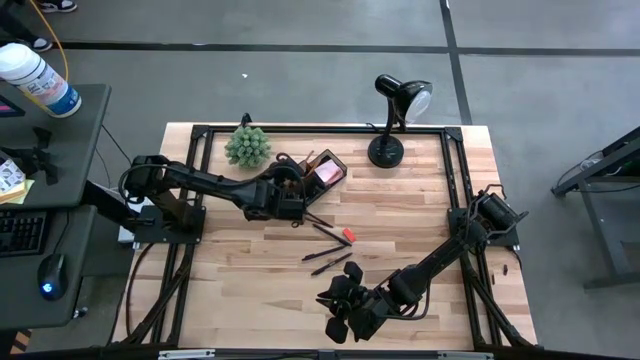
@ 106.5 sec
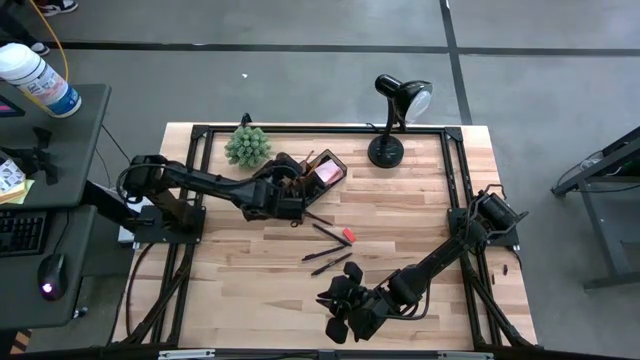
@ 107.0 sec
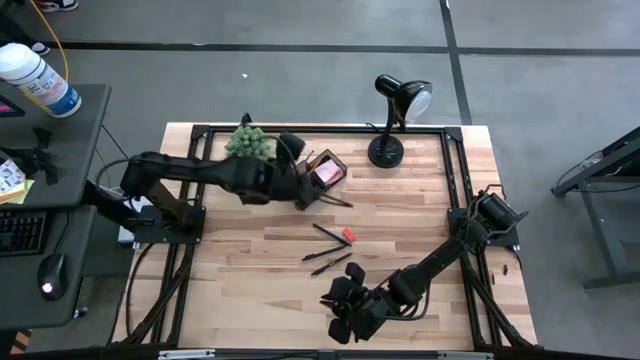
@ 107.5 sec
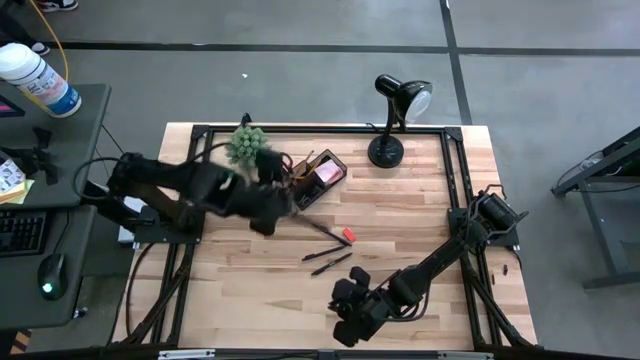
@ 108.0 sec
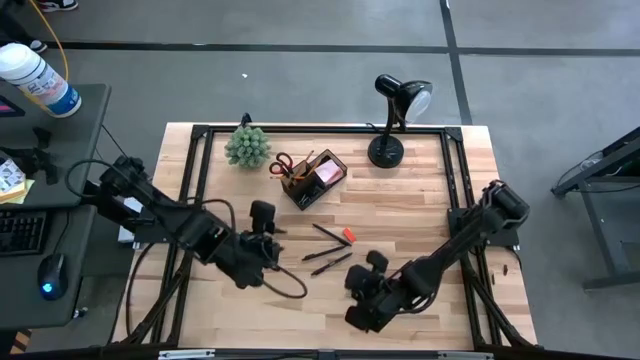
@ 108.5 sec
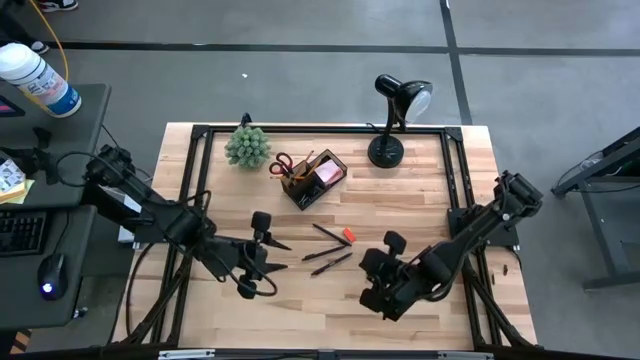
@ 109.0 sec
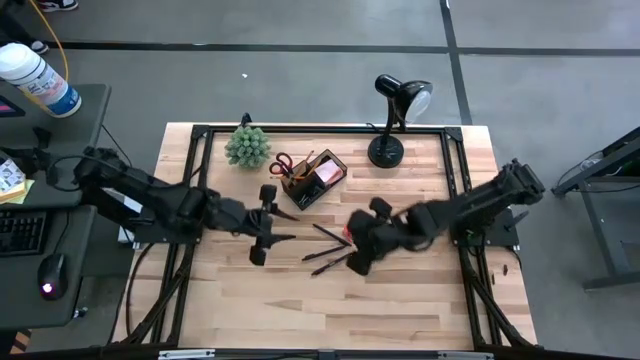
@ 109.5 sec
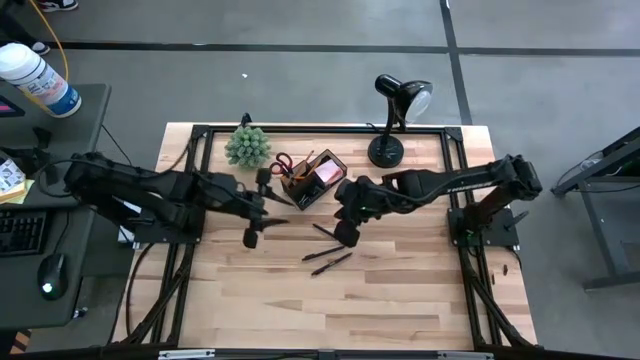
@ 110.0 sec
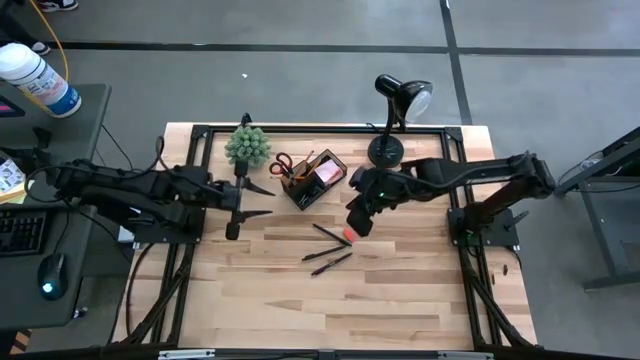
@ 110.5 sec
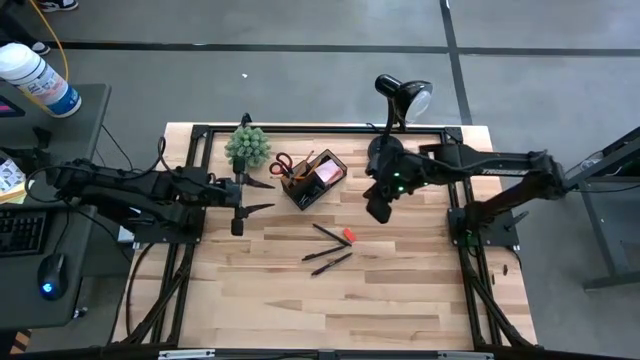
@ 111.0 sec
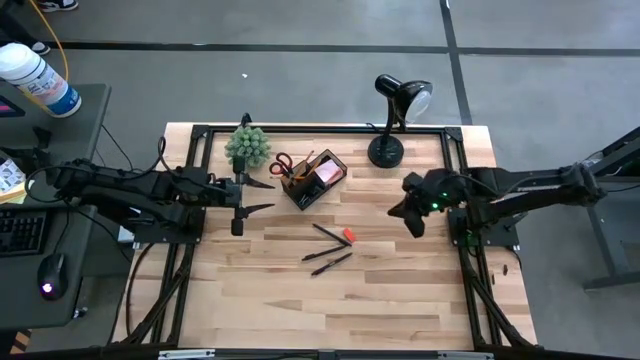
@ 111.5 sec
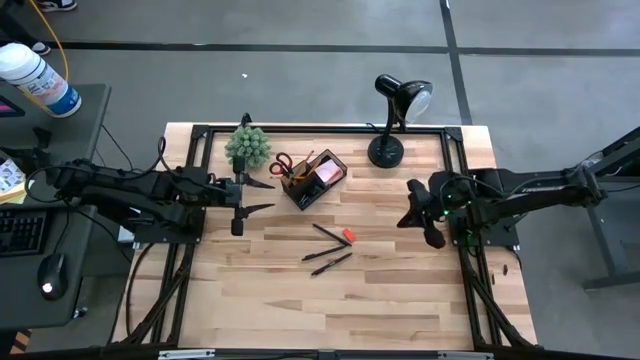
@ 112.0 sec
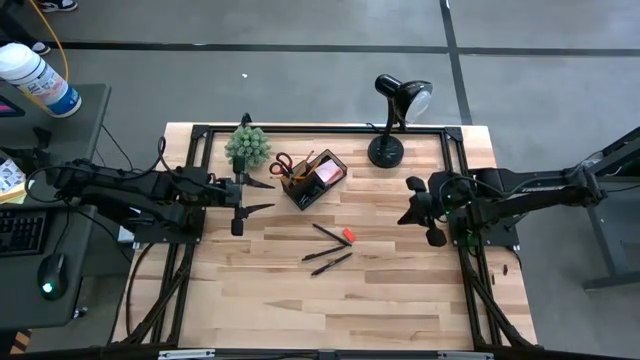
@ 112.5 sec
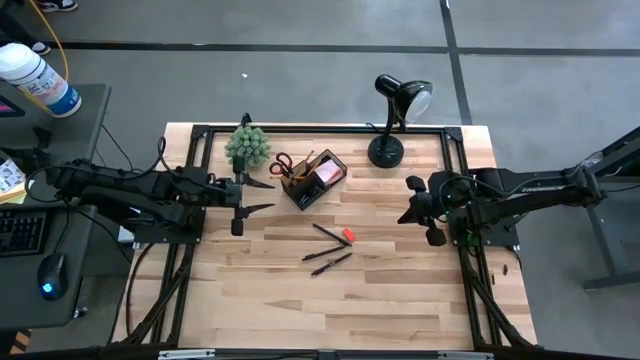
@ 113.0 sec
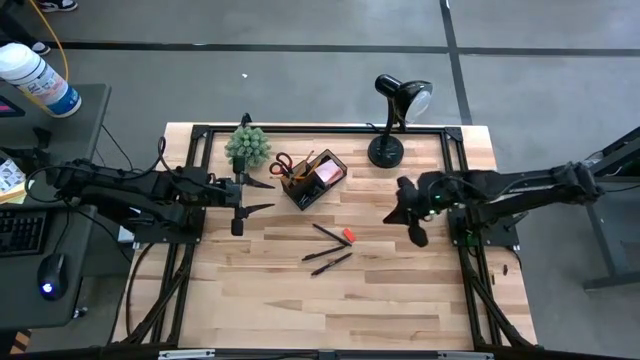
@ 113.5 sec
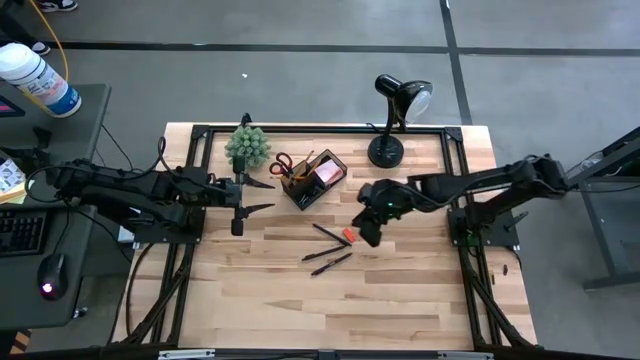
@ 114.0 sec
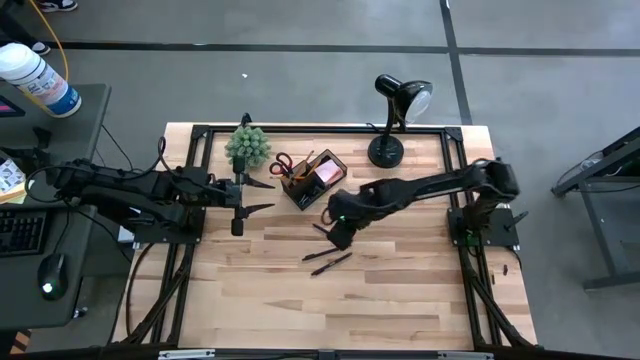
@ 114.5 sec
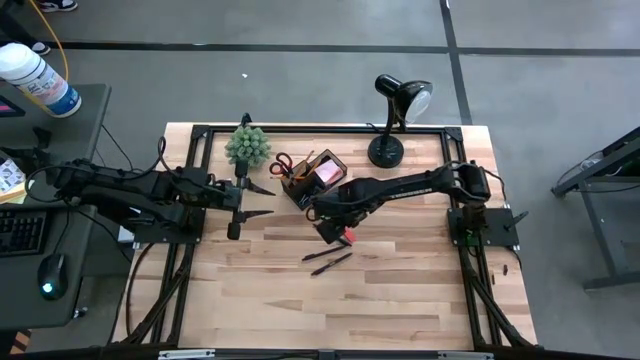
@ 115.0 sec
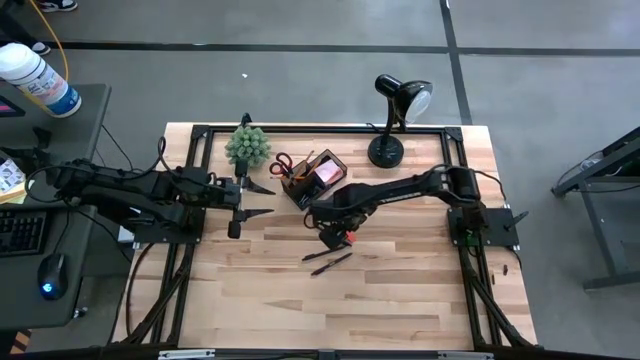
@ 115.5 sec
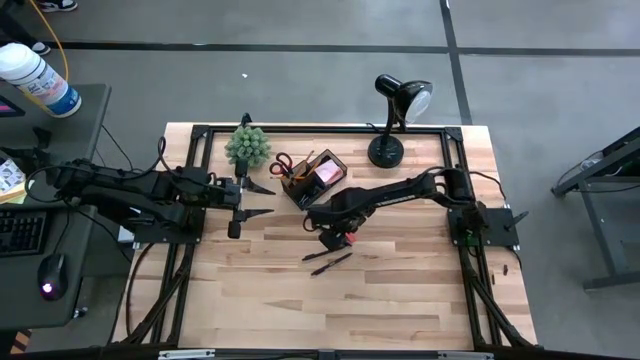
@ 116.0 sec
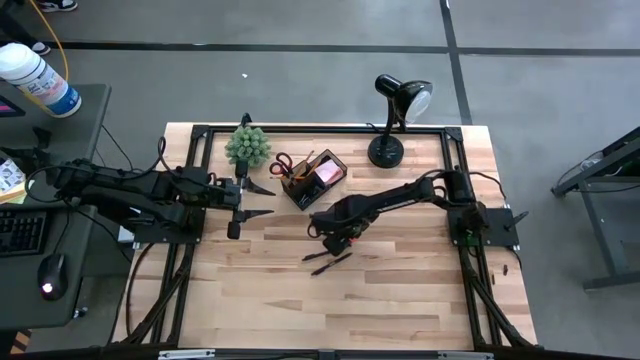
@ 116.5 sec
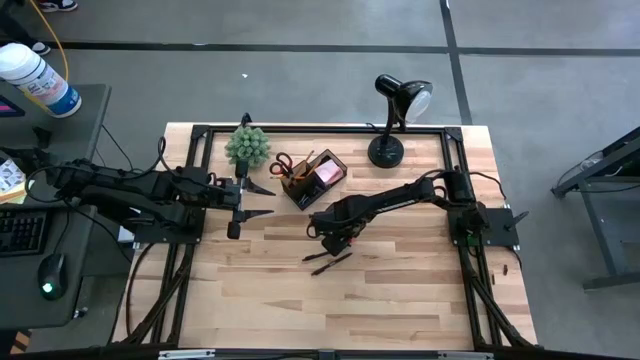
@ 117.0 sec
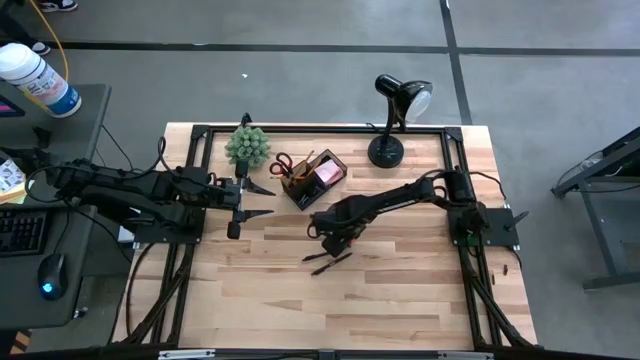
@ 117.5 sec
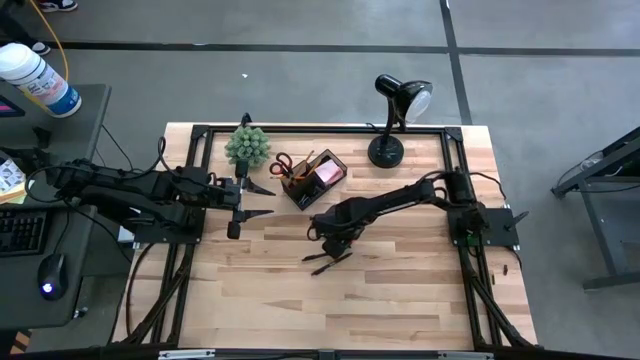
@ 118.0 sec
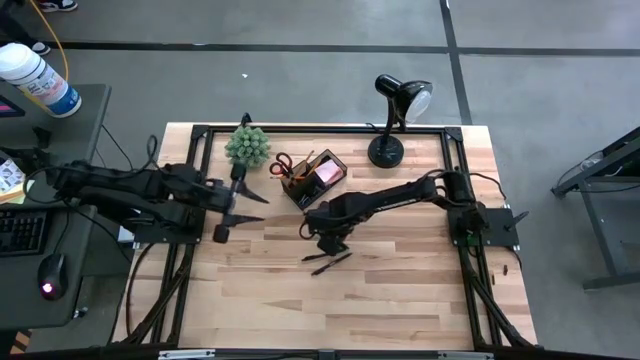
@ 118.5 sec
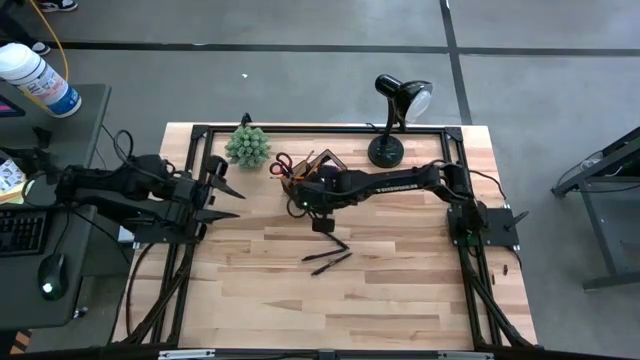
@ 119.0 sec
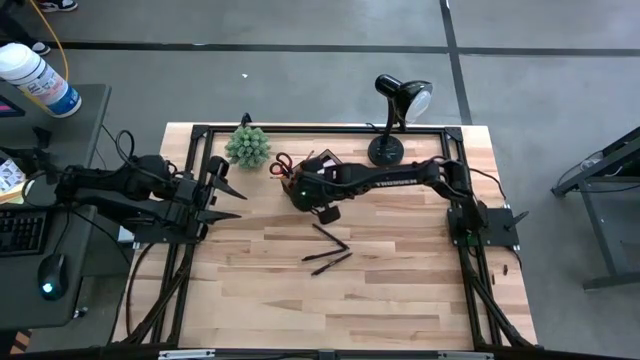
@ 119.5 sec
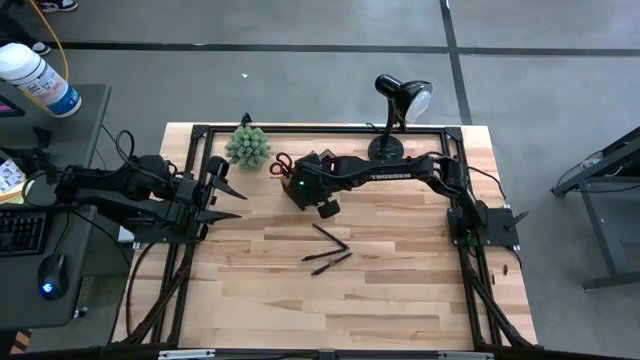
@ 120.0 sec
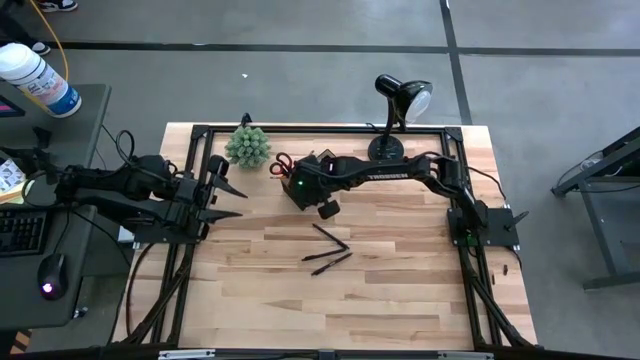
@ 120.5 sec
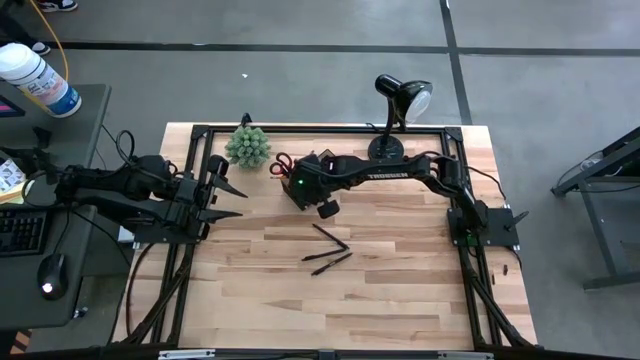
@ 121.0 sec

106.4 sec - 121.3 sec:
Task: Pick and place office supplies into organizer
Put the orange eraser into the black desk organizer

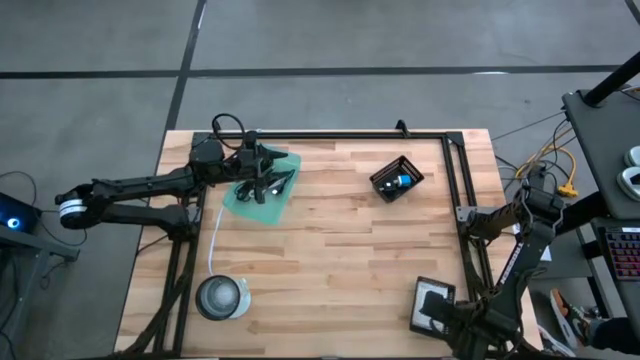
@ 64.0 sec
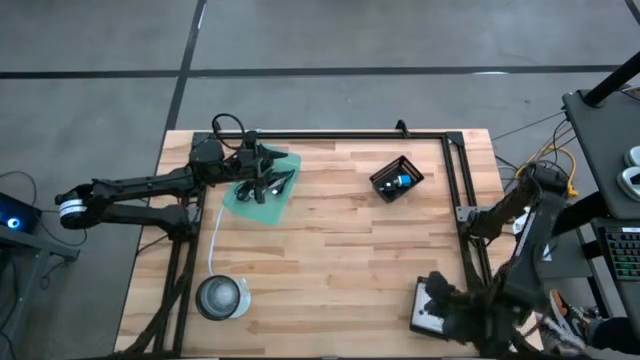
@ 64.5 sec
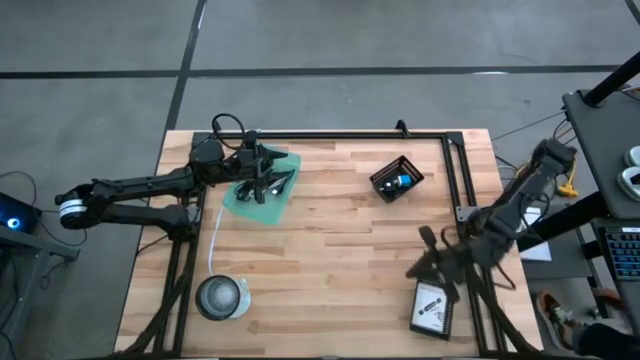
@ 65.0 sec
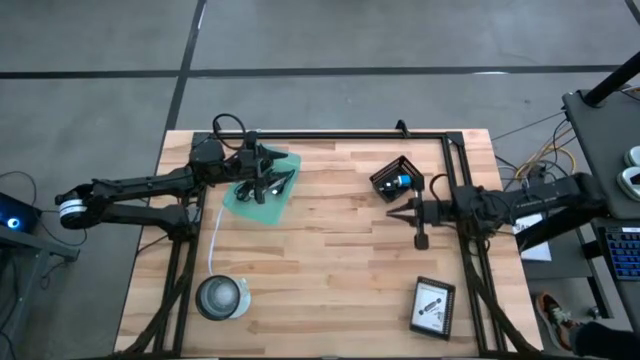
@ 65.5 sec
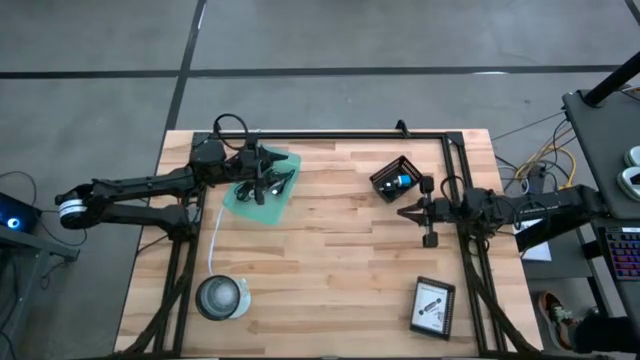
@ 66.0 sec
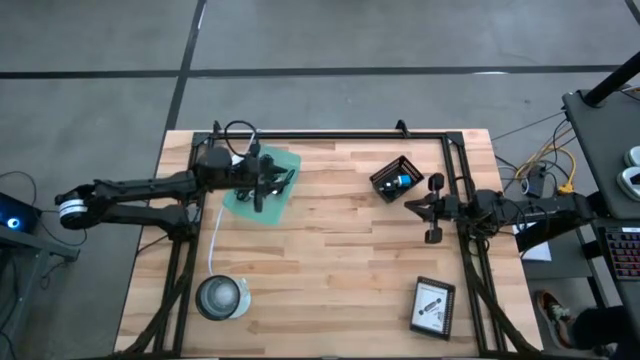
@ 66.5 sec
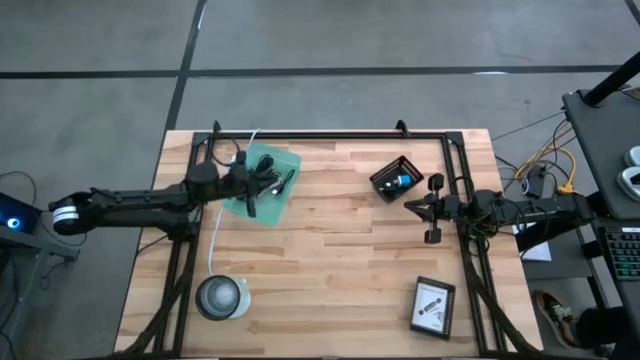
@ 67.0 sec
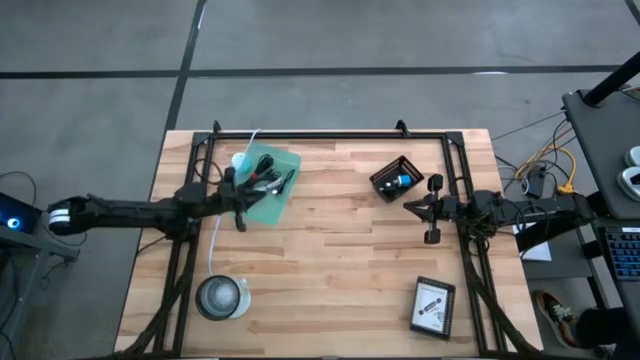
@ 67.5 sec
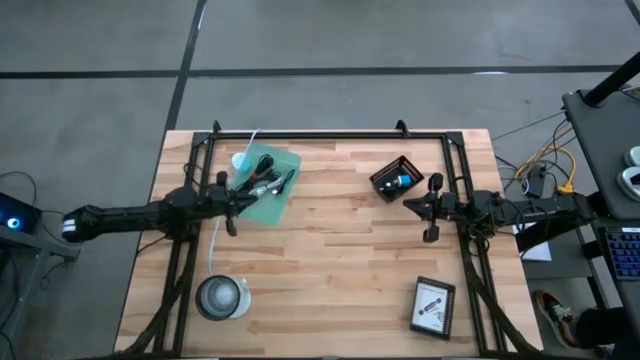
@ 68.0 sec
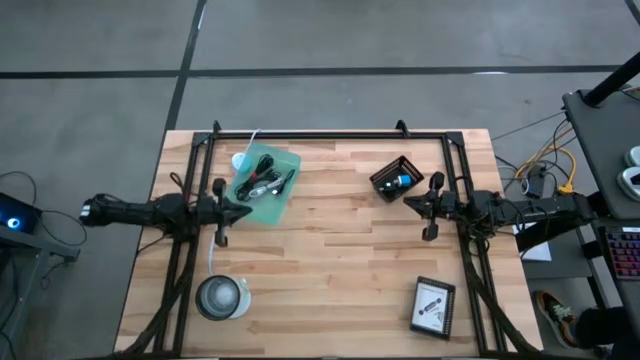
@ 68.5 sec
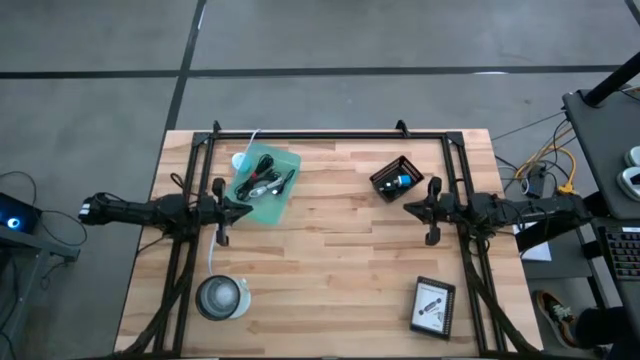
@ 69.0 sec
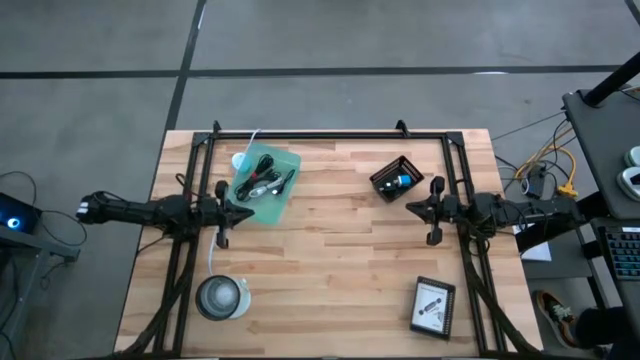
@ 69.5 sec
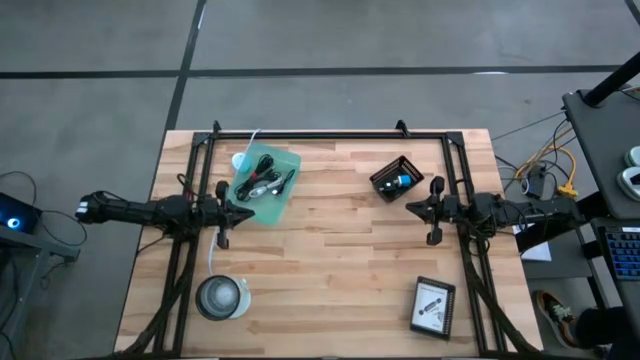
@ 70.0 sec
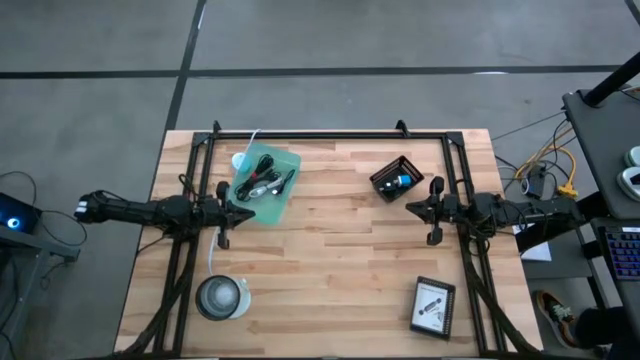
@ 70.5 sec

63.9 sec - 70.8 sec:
Task: Pick and place items into bin
Return to Home Position
